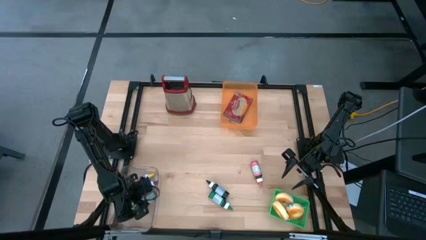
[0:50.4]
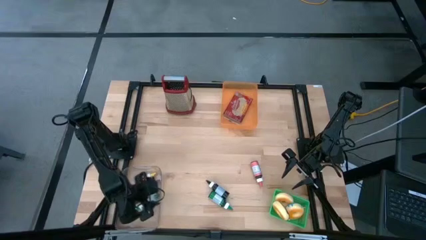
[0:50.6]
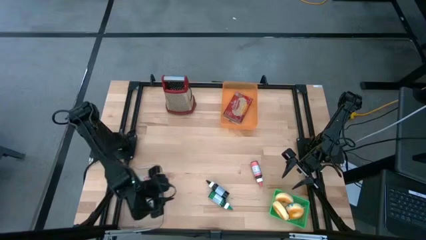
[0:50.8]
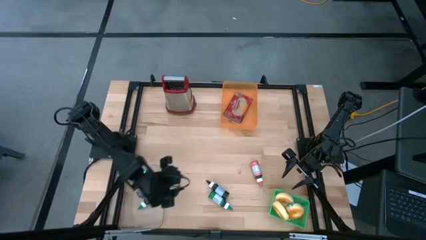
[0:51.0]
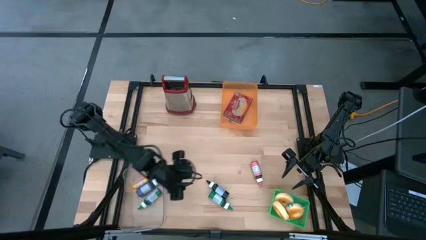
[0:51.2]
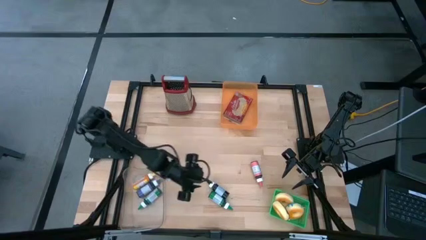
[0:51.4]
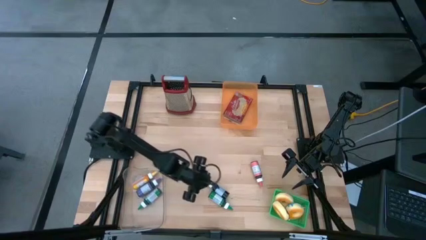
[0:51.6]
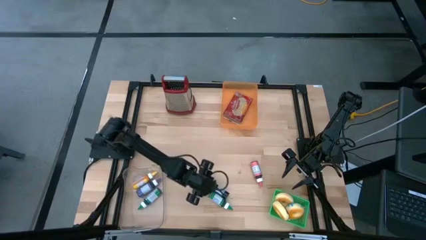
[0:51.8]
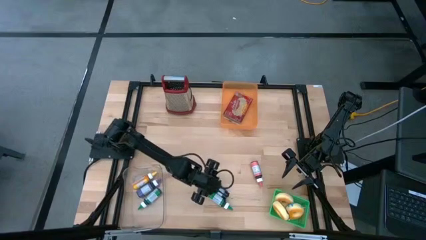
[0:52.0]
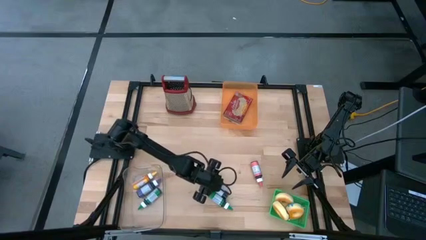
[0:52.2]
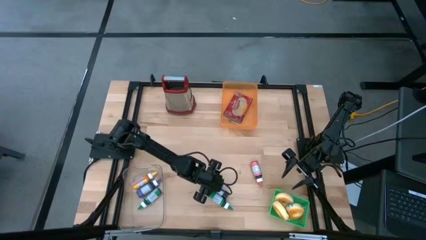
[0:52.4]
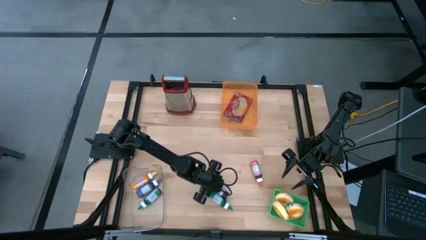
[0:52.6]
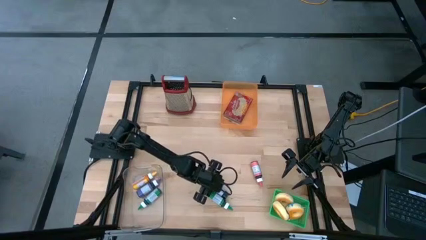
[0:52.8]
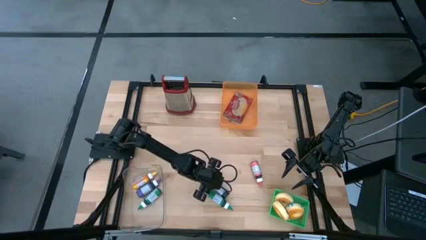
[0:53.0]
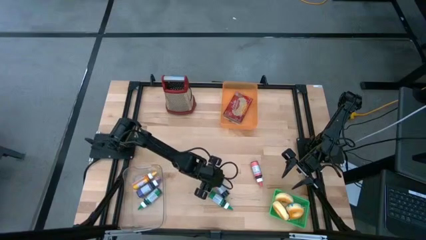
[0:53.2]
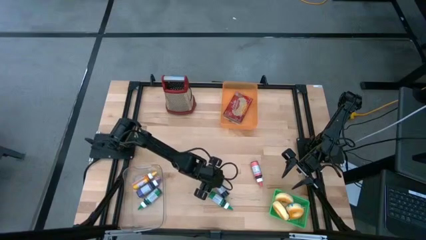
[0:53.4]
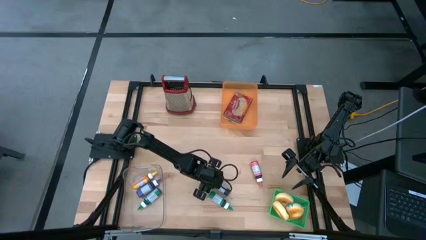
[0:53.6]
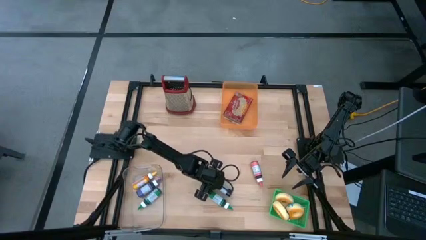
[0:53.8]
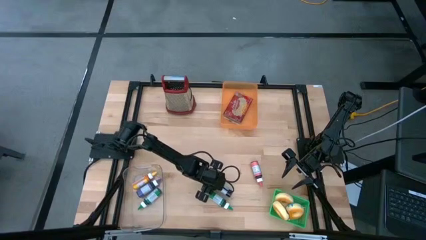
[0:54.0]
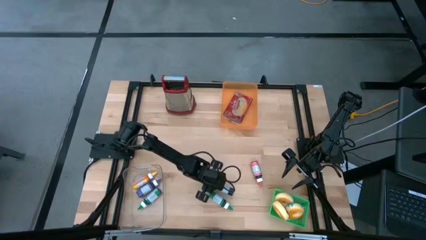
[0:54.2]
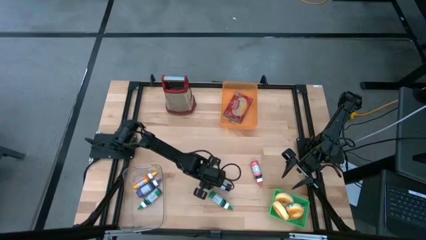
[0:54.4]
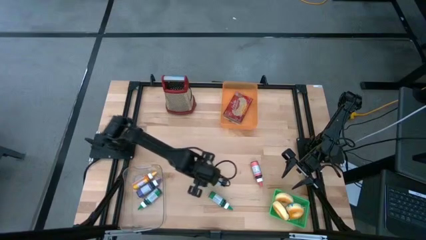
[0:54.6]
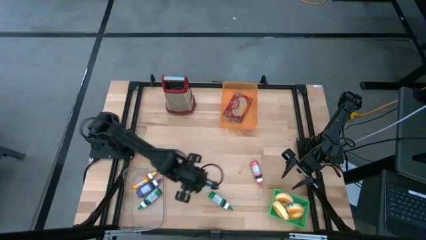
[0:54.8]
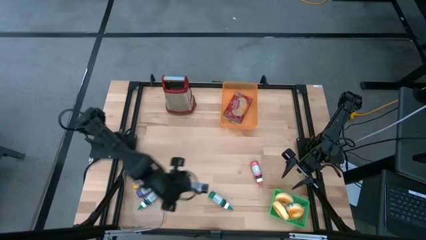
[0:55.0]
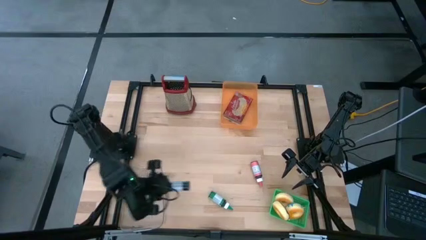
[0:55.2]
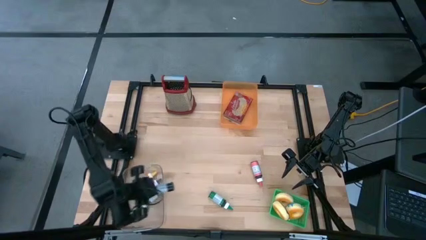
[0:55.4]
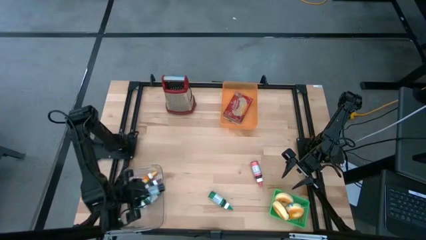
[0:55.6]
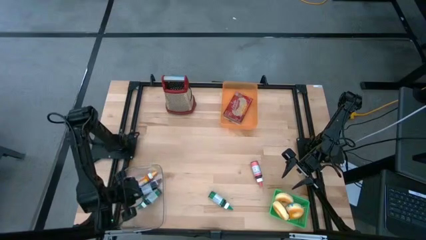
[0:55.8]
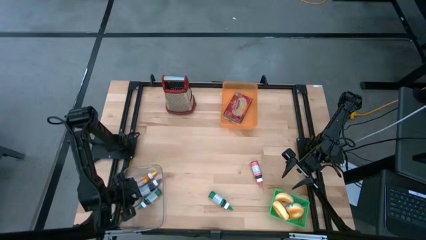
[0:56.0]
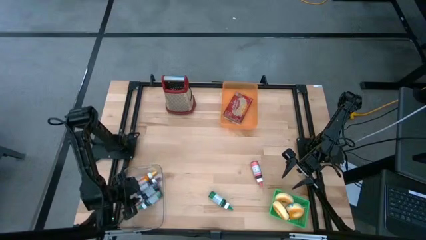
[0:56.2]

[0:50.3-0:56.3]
Put the black food coloring bottle into the transparent bin

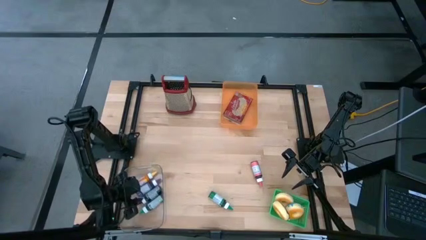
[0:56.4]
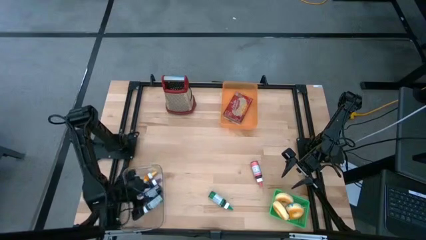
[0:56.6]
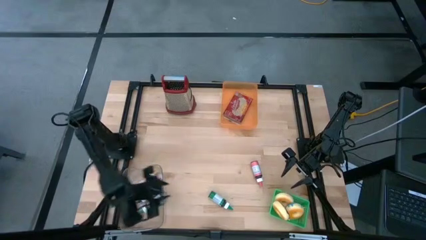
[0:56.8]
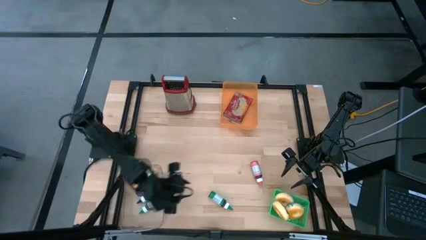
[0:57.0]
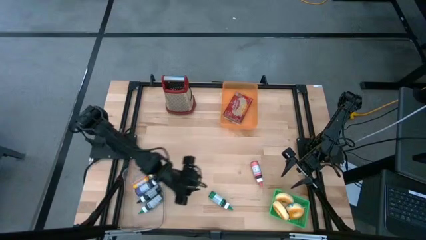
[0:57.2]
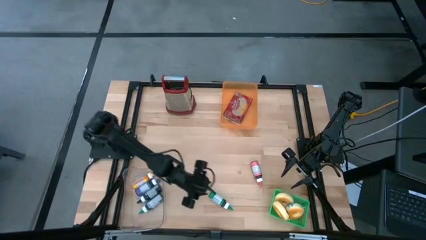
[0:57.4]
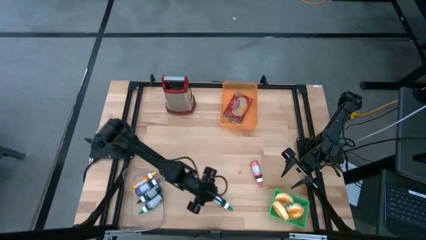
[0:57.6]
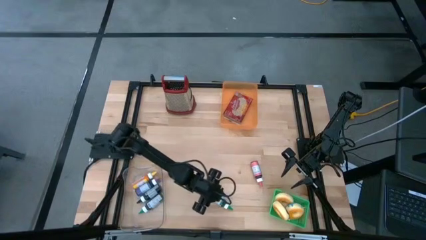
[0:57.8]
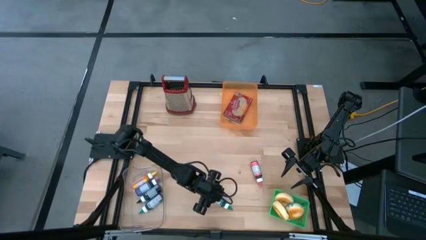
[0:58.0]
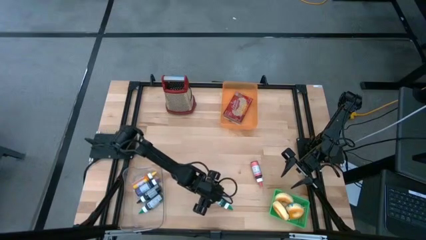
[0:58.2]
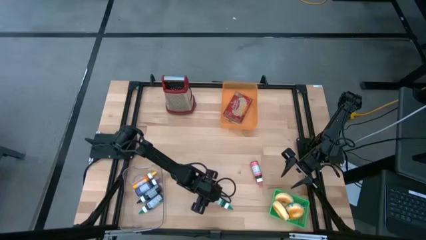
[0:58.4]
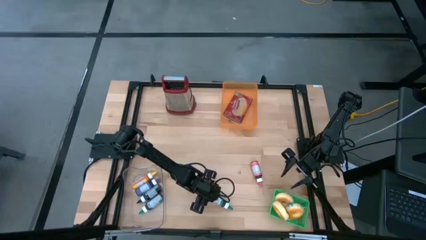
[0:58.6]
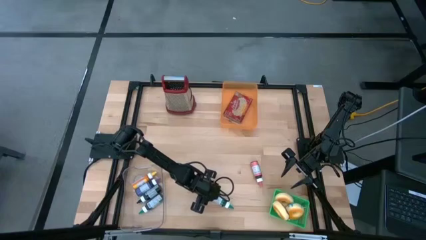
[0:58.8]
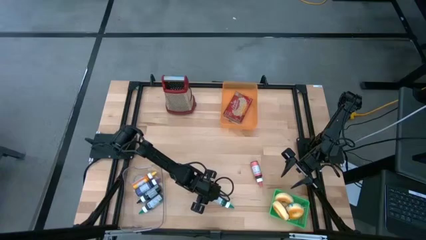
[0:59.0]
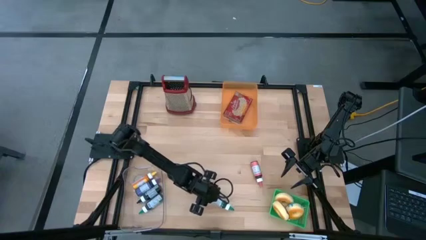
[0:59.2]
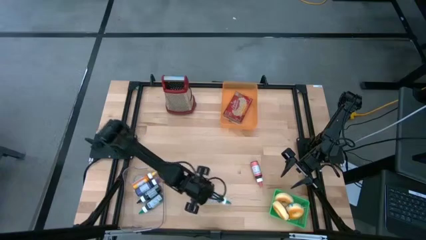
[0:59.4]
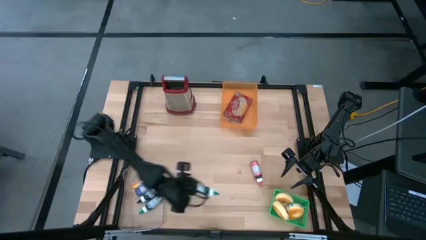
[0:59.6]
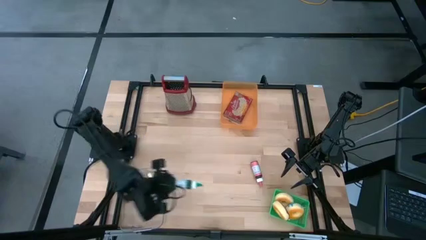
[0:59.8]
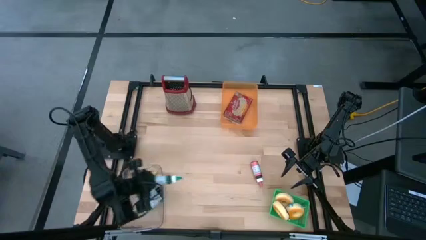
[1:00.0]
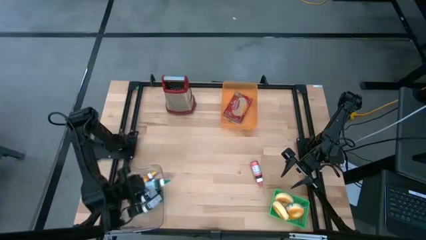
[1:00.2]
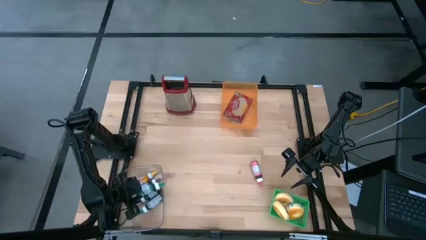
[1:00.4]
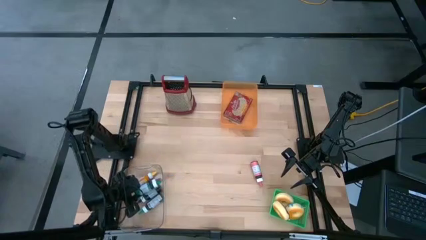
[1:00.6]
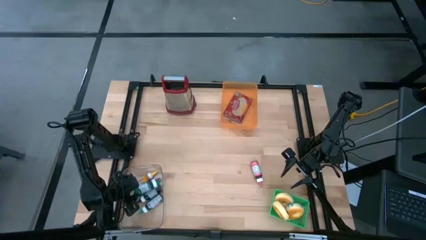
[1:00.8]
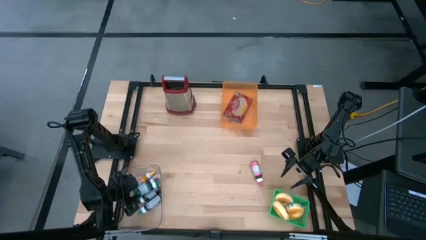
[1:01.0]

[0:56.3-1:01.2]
Put the green food coloring bottle into the transparent bin

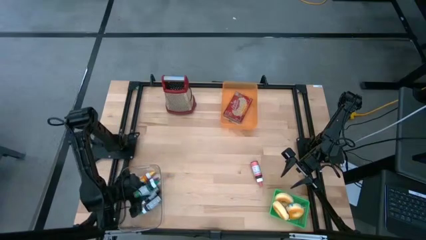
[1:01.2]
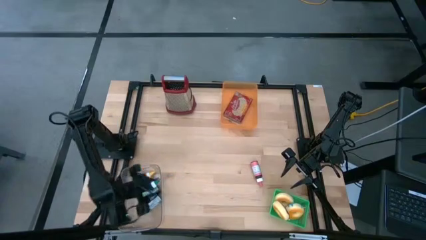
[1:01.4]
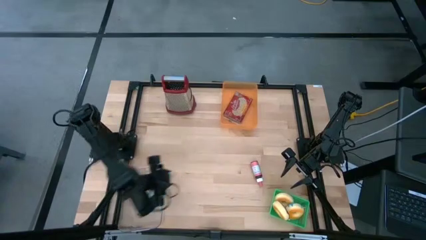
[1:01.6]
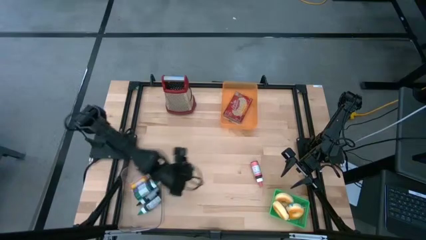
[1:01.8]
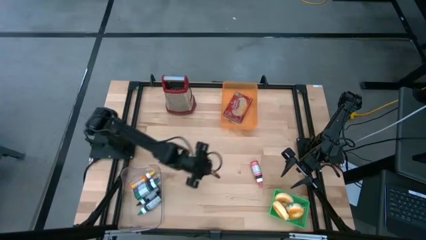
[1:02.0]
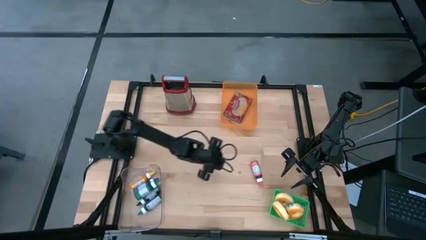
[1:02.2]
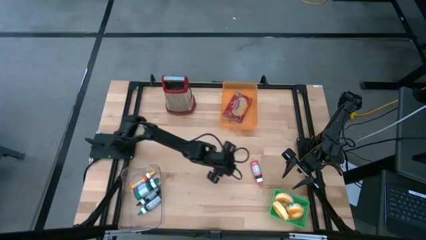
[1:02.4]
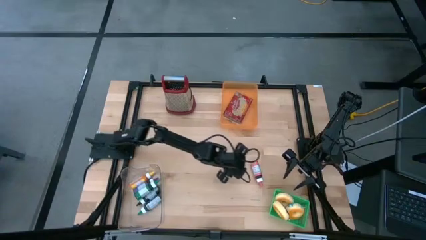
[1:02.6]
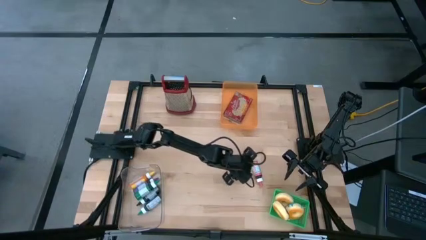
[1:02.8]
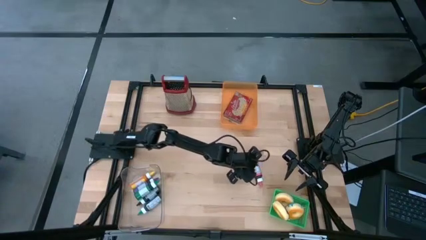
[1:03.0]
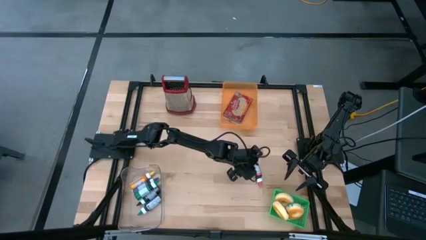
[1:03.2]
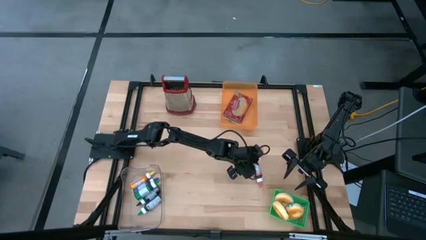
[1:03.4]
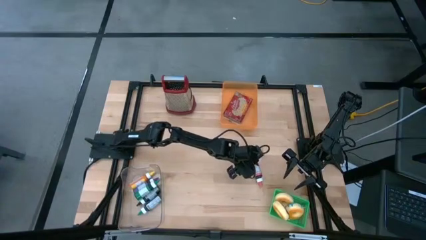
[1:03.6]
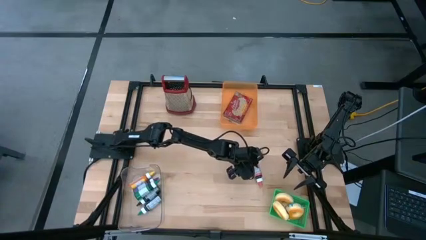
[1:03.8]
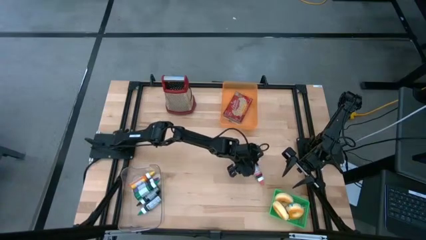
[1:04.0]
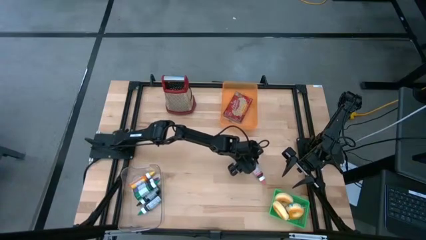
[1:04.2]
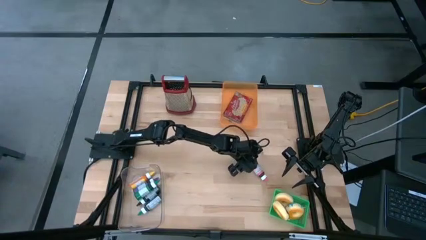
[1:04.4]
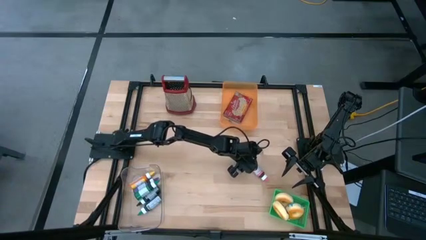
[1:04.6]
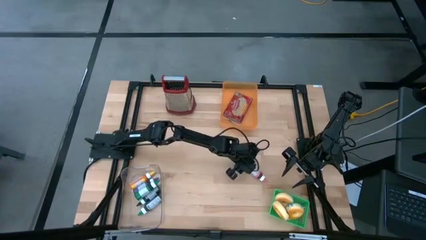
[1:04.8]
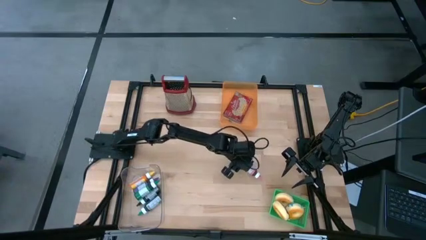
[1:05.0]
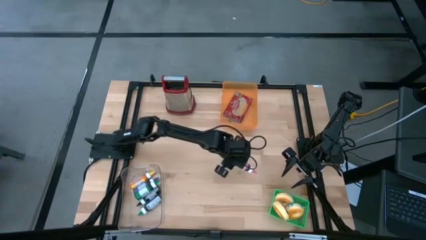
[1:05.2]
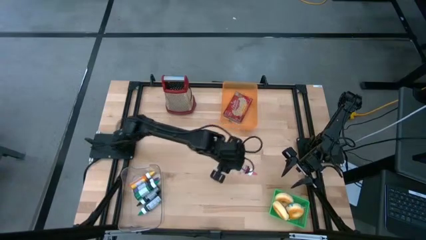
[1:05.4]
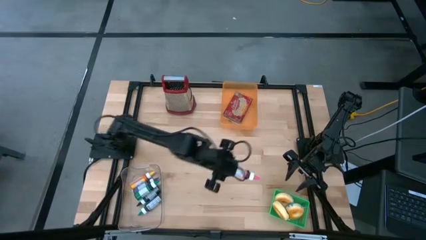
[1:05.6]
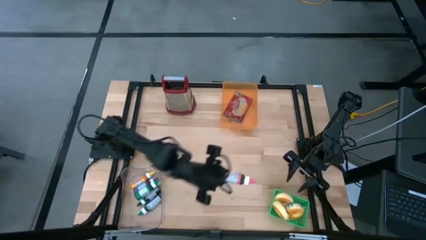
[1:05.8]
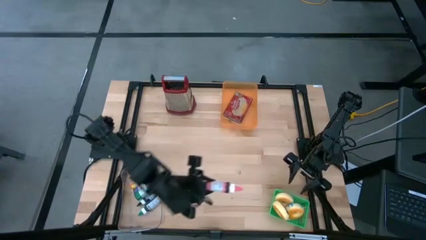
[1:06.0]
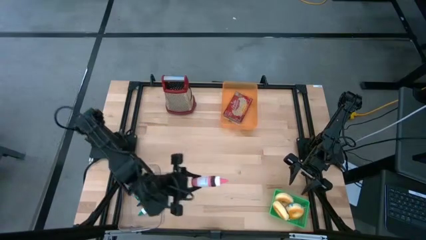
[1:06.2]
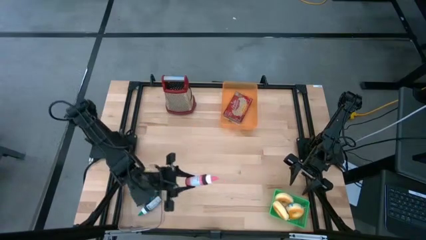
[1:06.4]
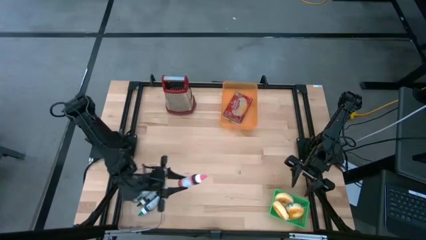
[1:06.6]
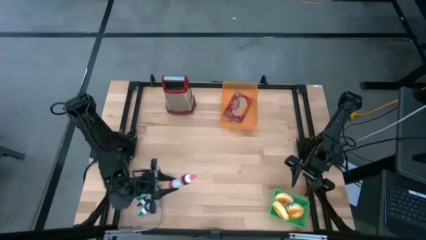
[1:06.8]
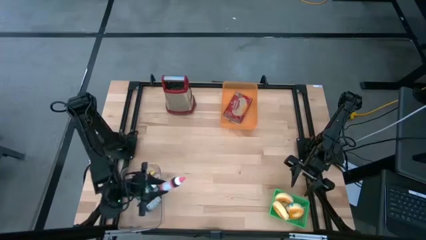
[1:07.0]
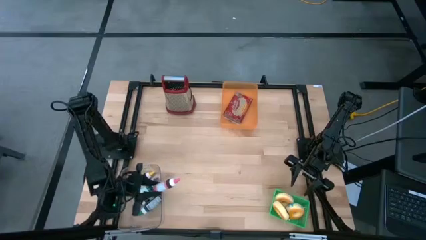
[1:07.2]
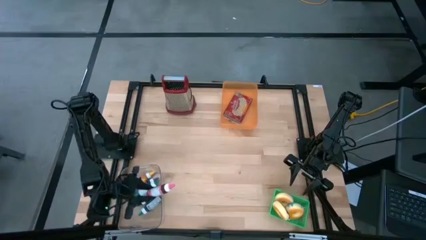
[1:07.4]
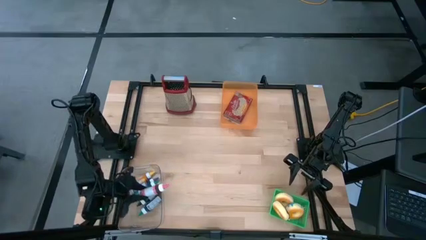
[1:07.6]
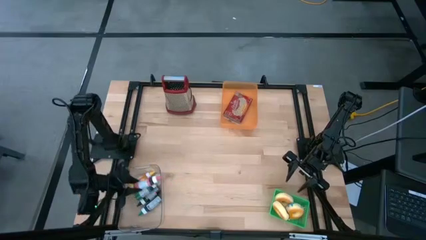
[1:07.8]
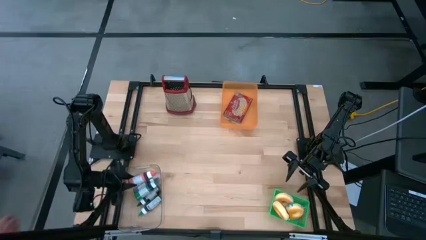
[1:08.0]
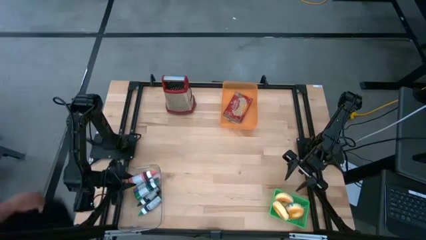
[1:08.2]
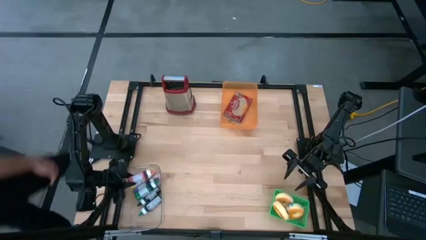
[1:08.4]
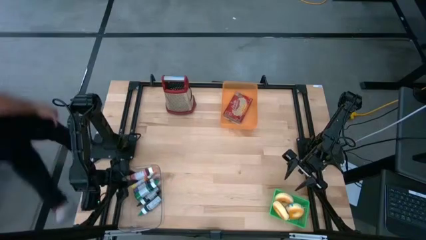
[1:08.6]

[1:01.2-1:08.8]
Put the pink food coloring bottle into the transparent bin
